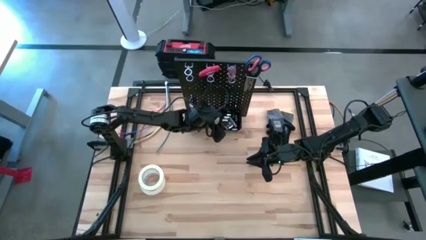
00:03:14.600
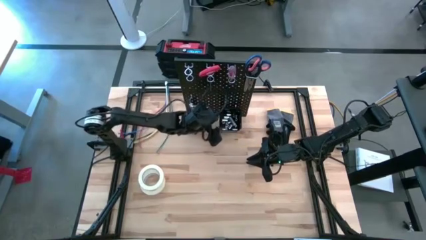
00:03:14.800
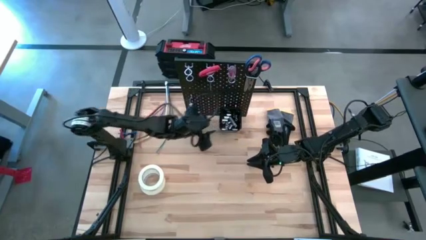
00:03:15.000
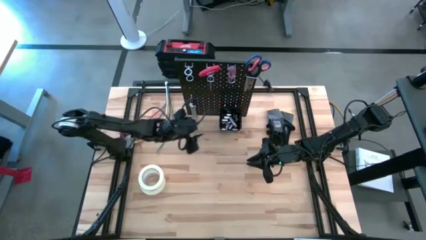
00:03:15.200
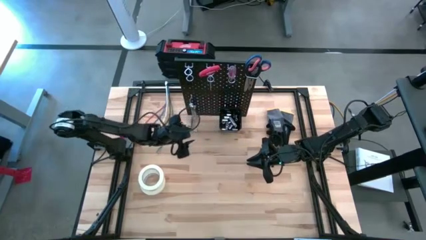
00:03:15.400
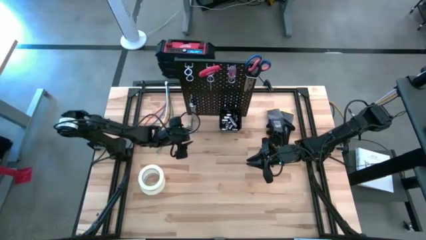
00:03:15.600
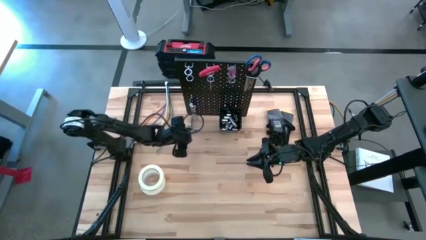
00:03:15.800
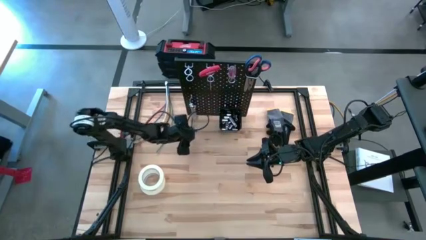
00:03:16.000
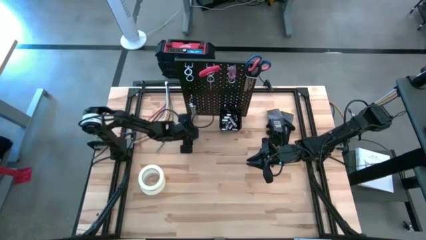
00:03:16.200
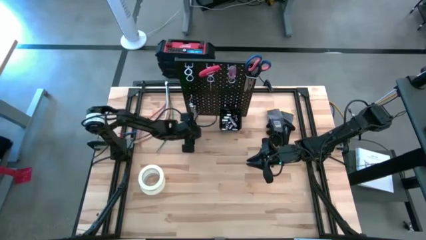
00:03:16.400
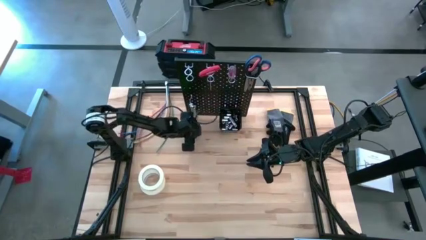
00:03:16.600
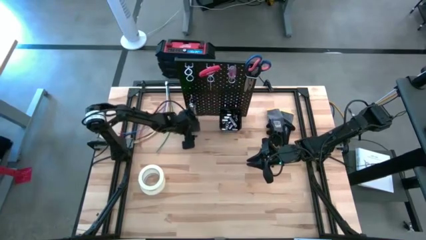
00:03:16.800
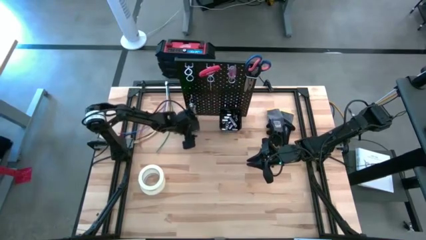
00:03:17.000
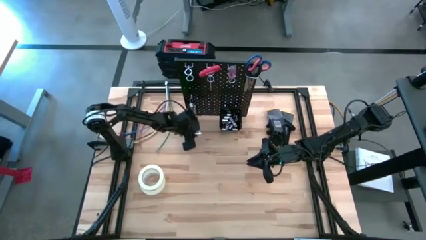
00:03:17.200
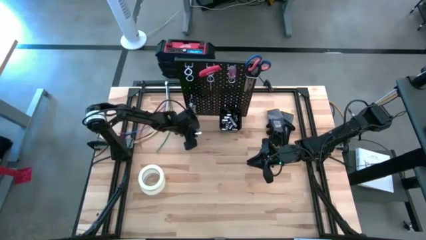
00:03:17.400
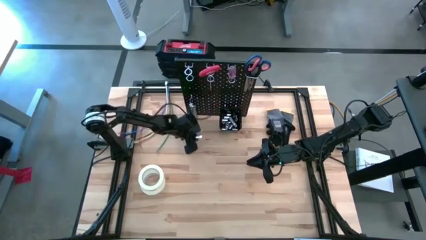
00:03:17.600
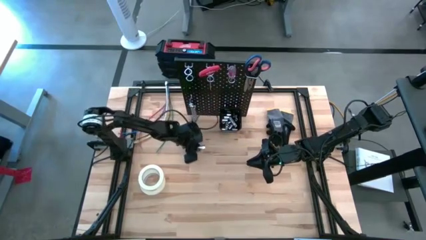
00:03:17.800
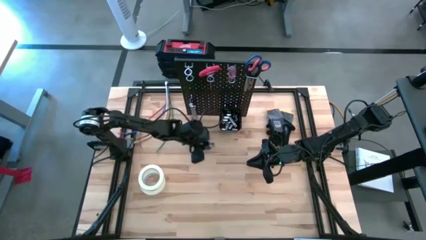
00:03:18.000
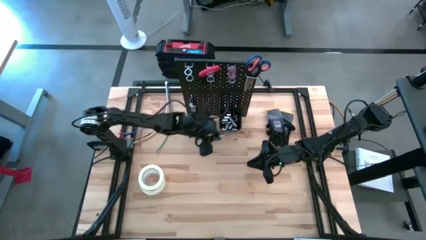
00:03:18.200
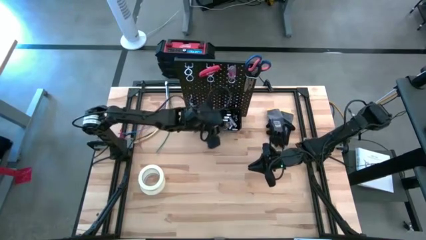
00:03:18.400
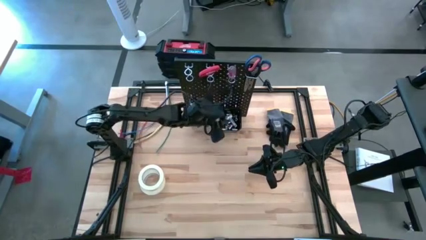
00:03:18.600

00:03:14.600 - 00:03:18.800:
Task: Hang tools onto peg board
Put the extension bar into the black bin on the peg board

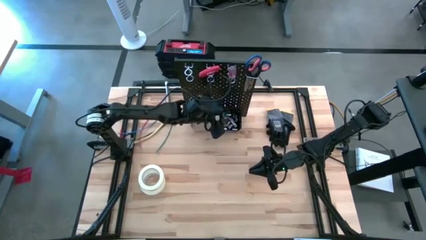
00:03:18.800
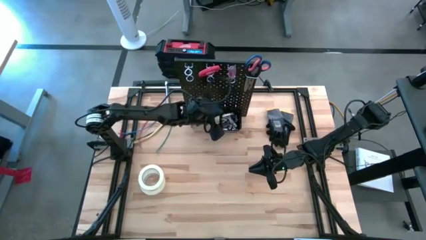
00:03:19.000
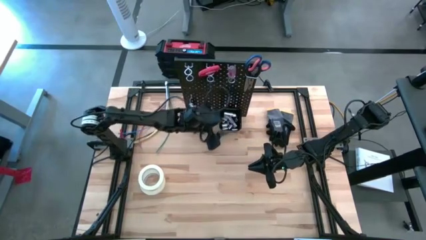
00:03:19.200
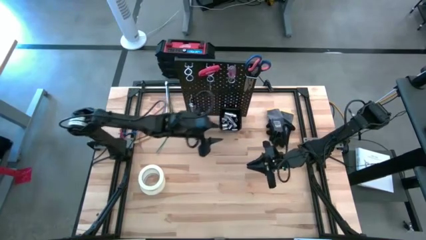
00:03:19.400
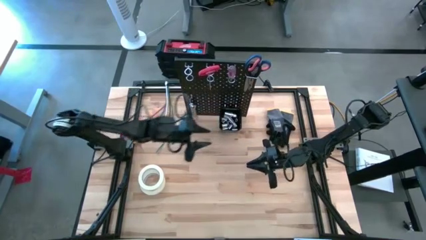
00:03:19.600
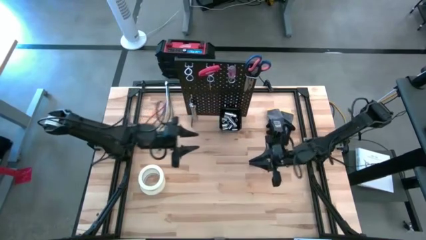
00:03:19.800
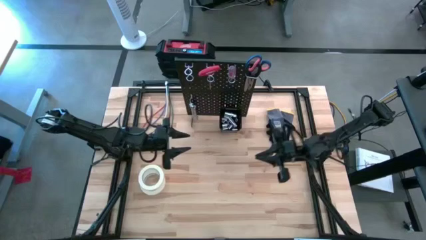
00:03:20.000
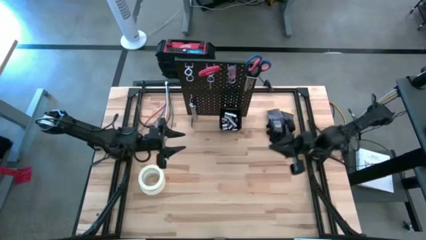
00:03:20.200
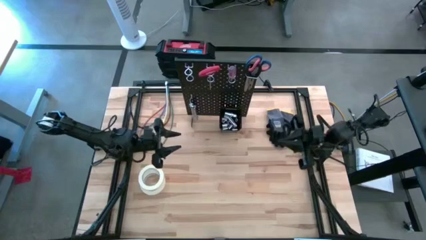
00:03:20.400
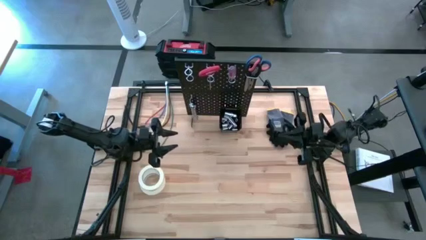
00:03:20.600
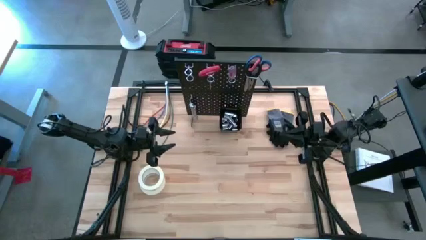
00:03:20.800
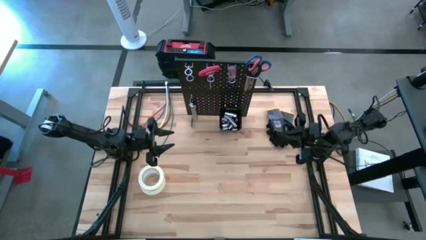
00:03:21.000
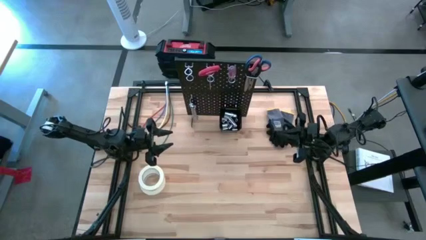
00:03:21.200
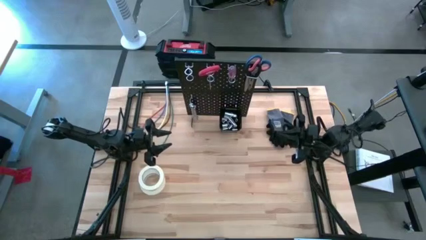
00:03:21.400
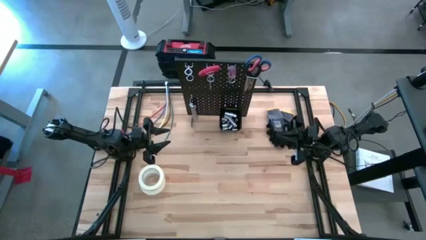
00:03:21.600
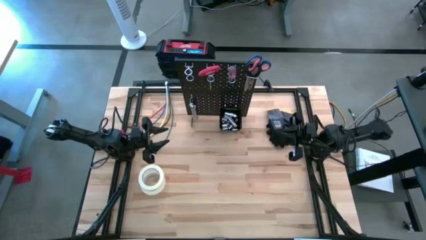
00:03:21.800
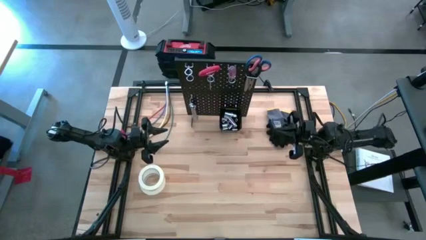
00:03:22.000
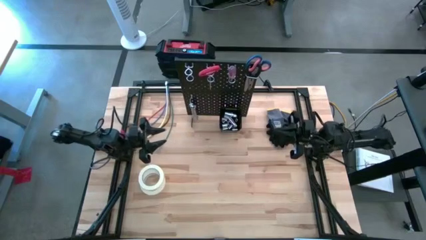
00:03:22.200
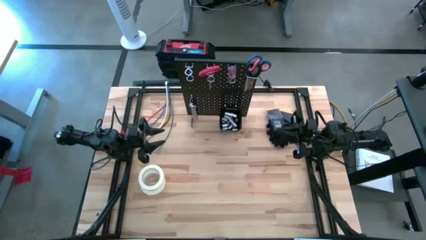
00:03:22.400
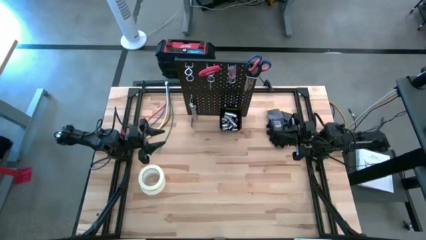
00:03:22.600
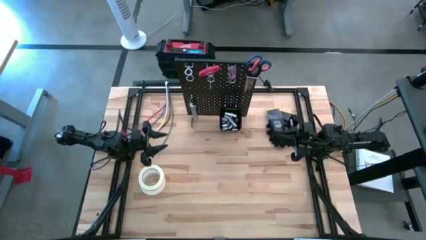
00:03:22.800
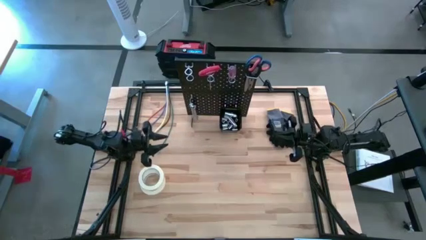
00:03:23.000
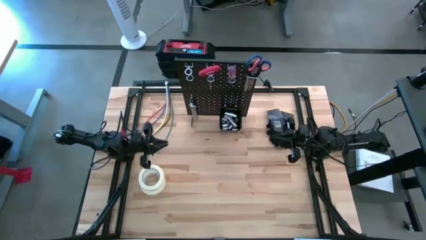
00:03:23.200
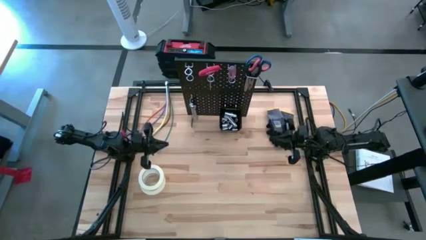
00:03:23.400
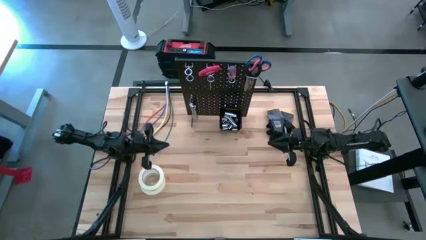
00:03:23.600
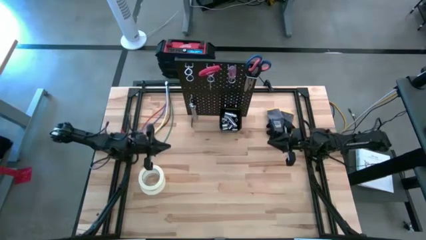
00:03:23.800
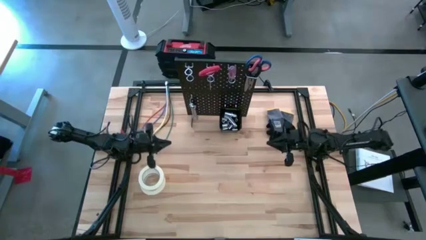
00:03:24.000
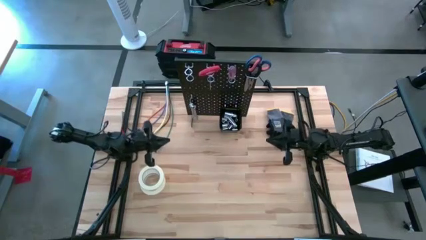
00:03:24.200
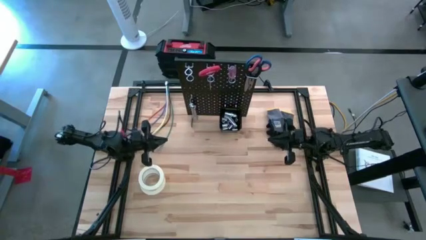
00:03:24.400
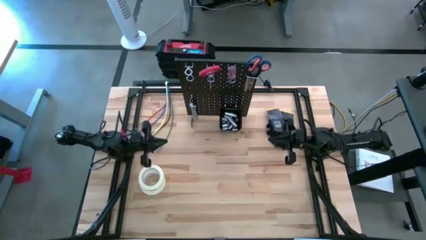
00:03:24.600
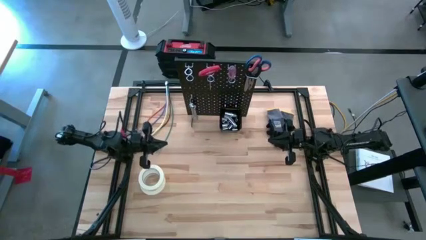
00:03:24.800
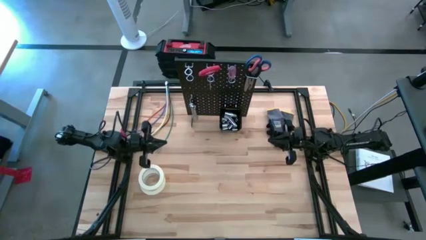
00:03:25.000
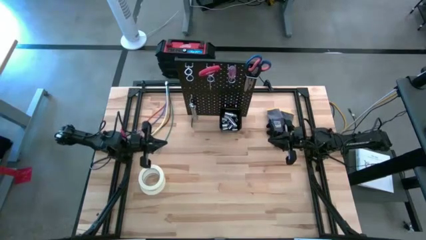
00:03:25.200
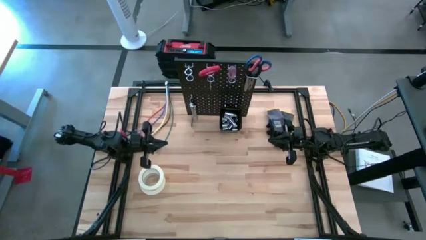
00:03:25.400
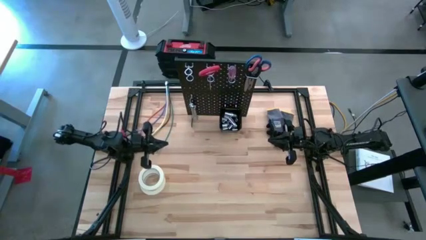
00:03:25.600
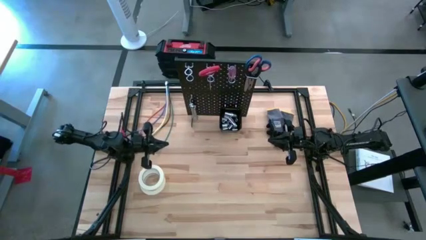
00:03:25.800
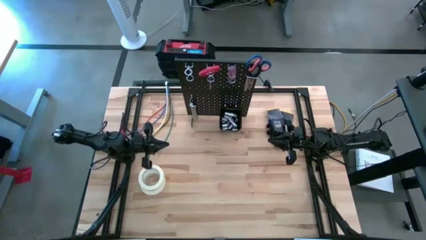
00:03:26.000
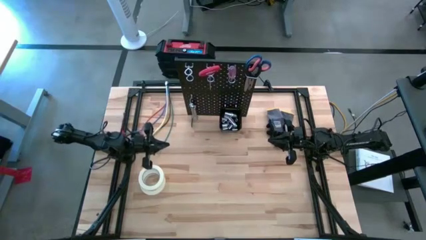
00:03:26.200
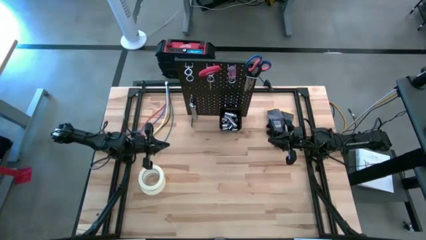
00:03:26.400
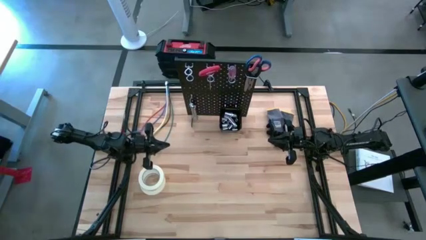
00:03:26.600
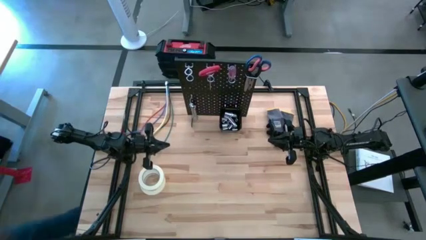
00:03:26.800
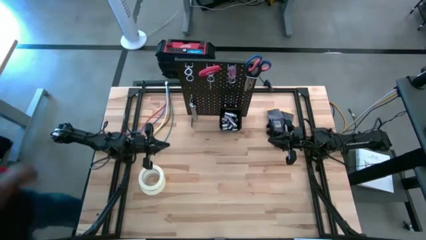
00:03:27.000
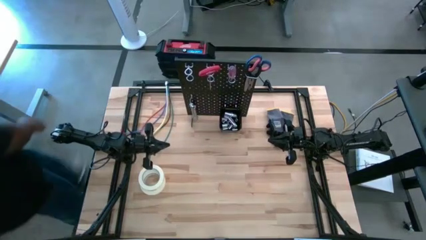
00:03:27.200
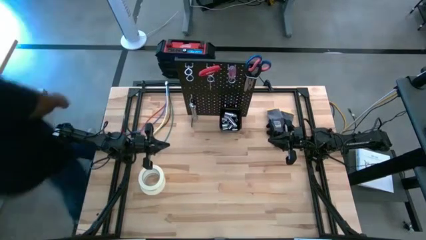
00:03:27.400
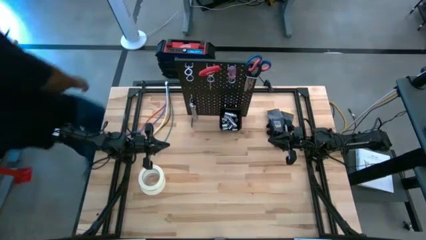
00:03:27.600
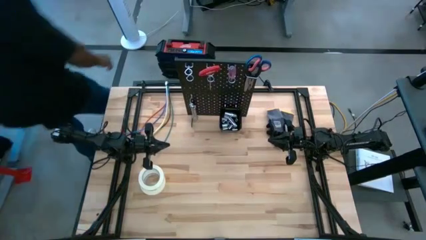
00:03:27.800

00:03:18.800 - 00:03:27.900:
Return to Home Position

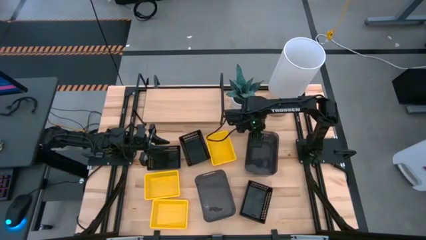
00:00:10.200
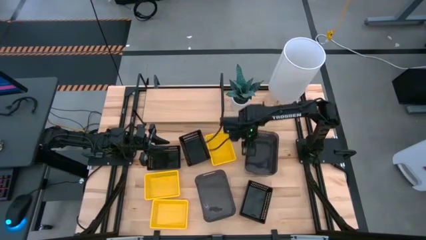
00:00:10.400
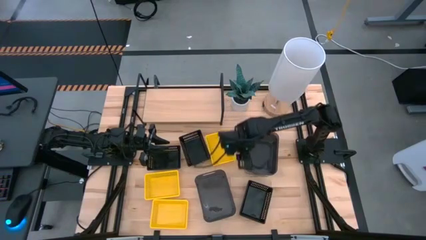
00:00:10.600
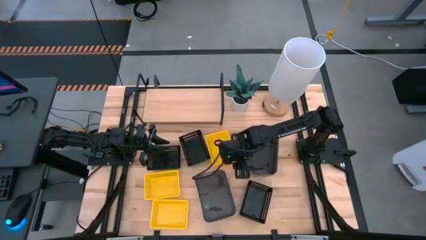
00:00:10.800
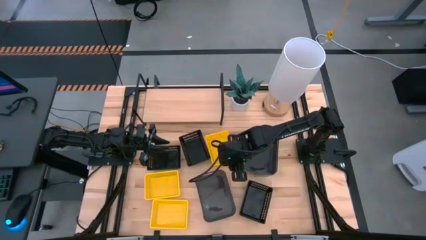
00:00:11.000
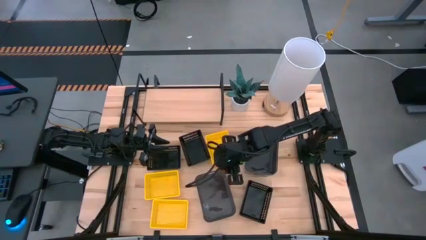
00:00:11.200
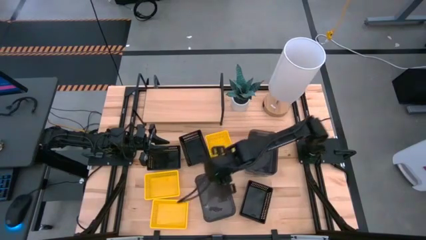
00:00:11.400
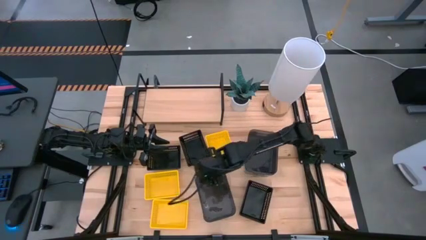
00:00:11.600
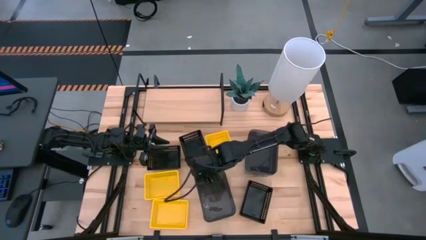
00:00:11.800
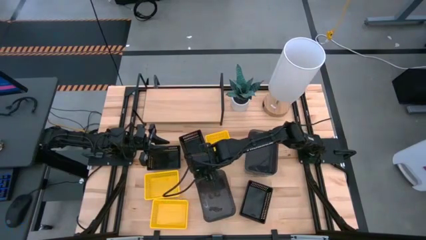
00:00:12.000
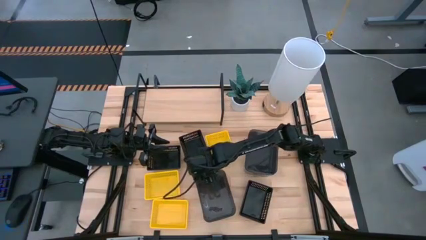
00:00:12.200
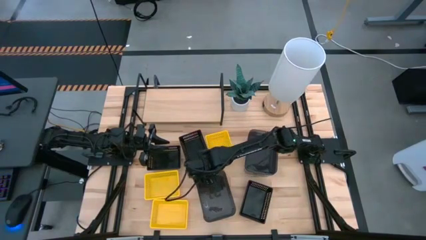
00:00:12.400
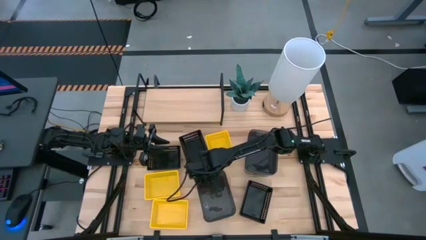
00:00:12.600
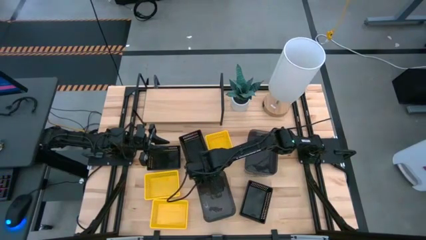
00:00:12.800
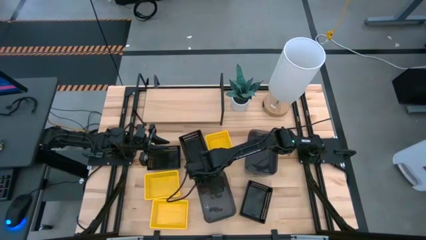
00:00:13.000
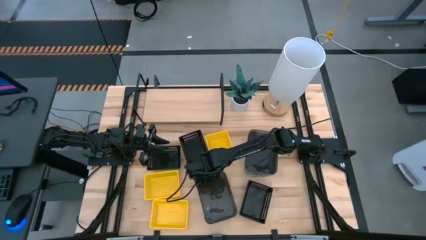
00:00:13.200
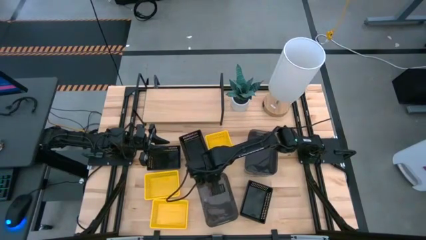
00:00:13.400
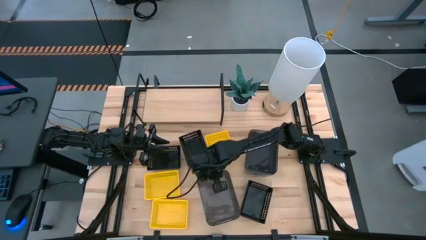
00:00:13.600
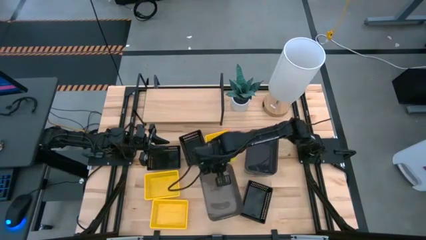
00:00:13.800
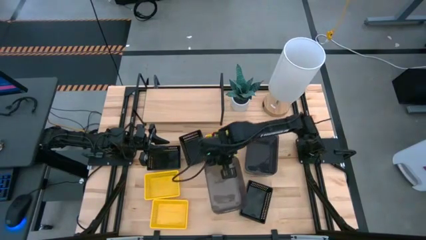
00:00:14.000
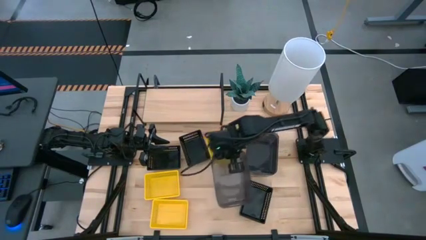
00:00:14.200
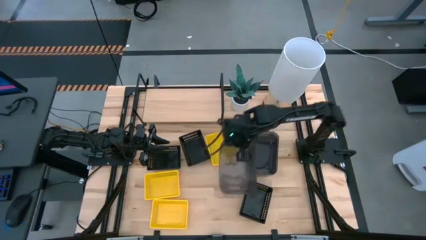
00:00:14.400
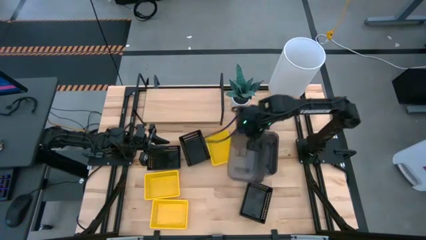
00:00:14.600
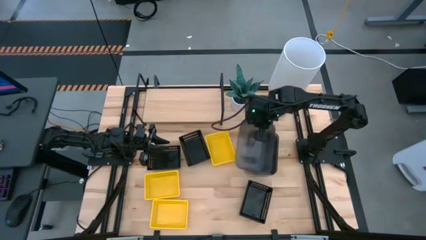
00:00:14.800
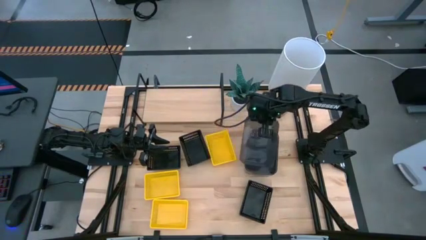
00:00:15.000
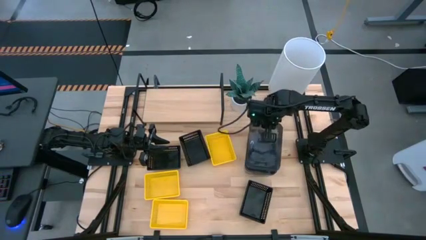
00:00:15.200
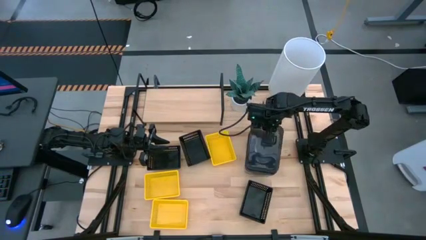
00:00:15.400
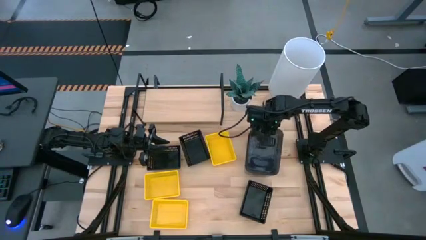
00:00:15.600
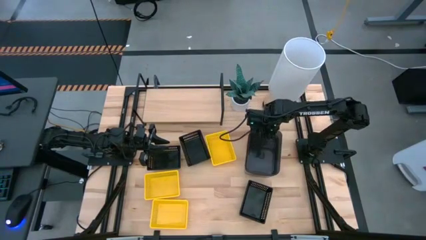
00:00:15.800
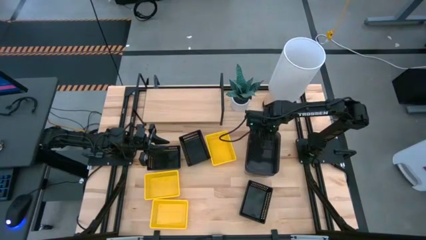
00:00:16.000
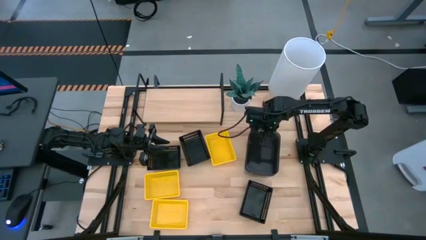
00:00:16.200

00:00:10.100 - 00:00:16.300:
Task: Stack baskets on shelf by color
Stack the black transparent bin into the stacked black transparent bins
